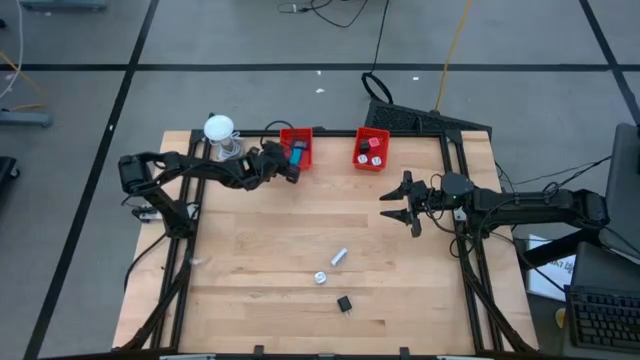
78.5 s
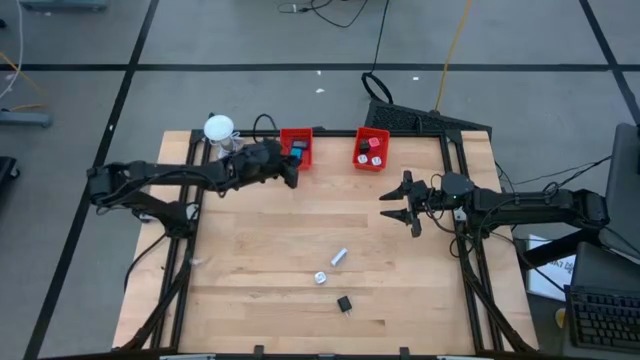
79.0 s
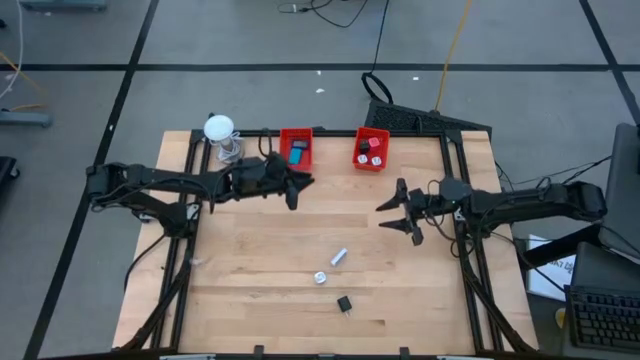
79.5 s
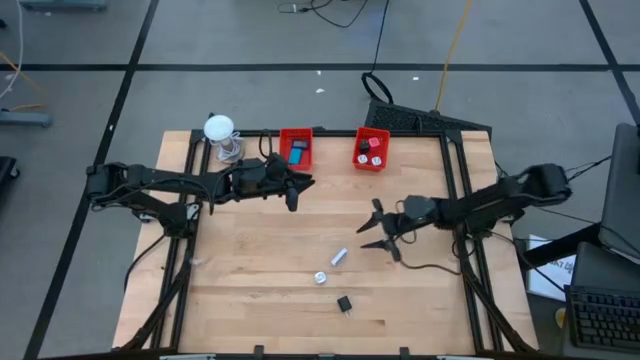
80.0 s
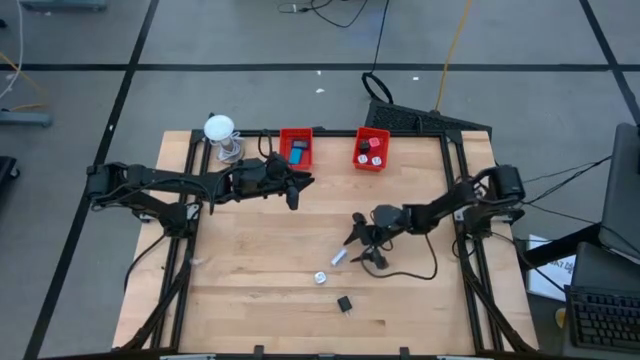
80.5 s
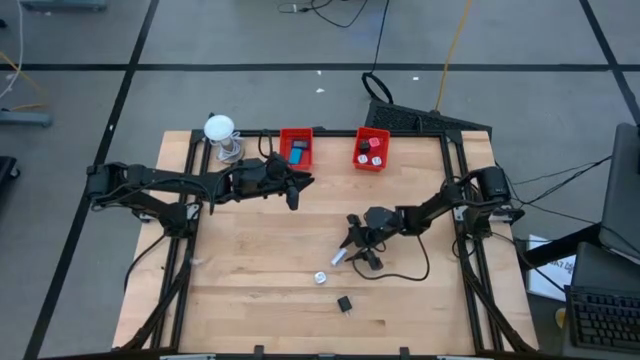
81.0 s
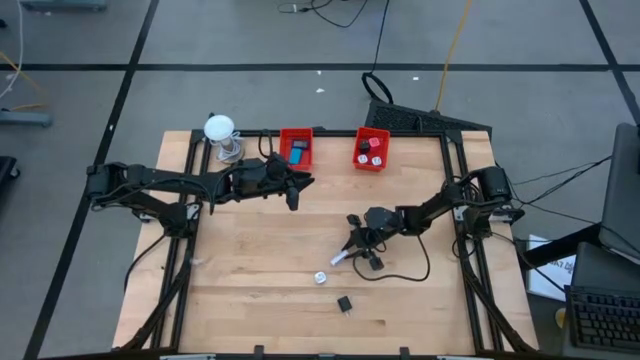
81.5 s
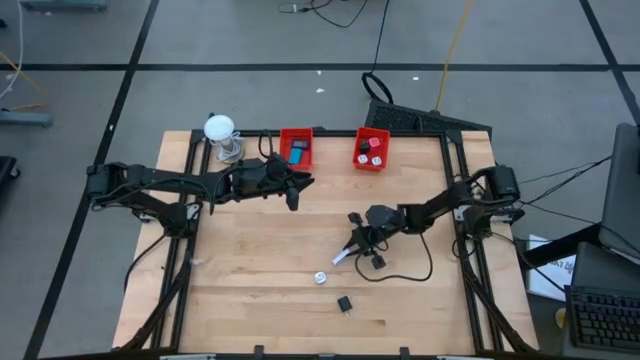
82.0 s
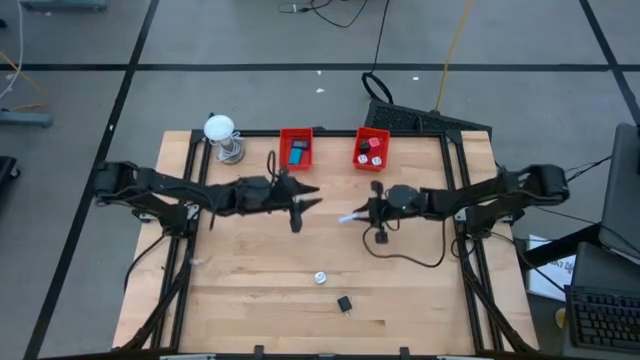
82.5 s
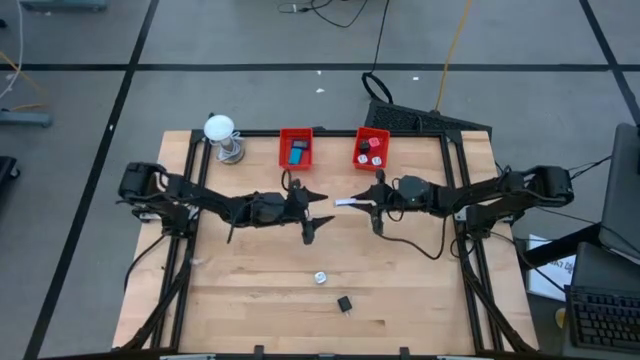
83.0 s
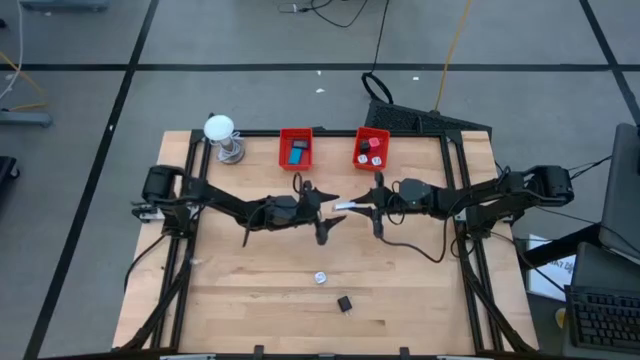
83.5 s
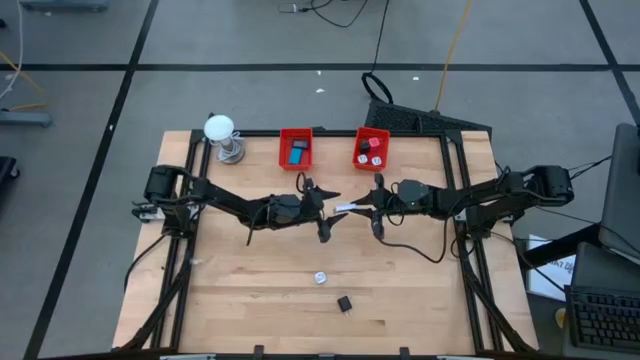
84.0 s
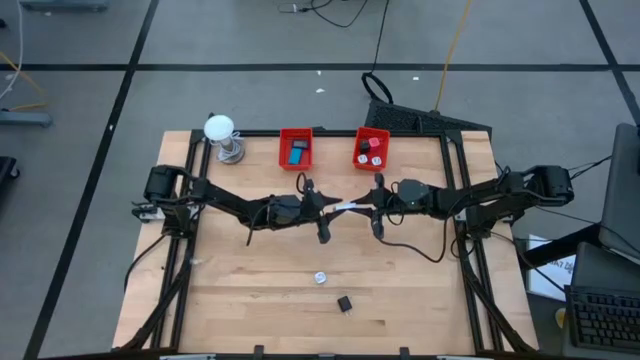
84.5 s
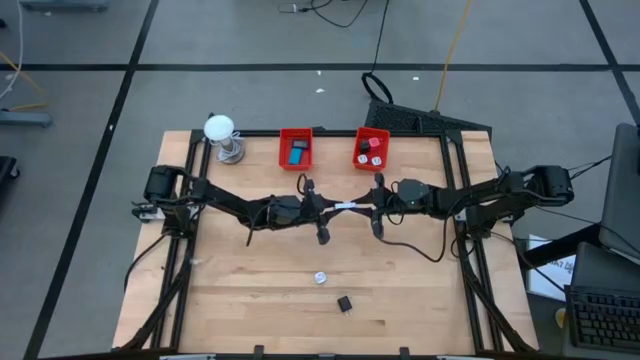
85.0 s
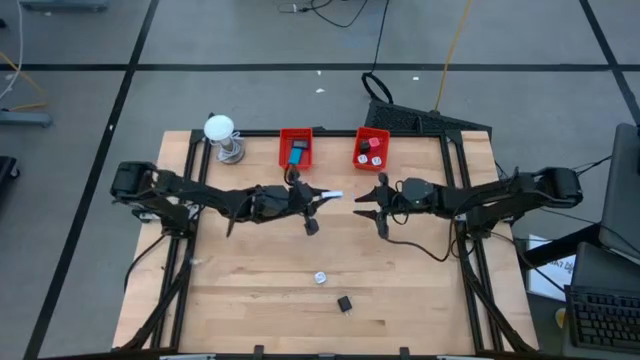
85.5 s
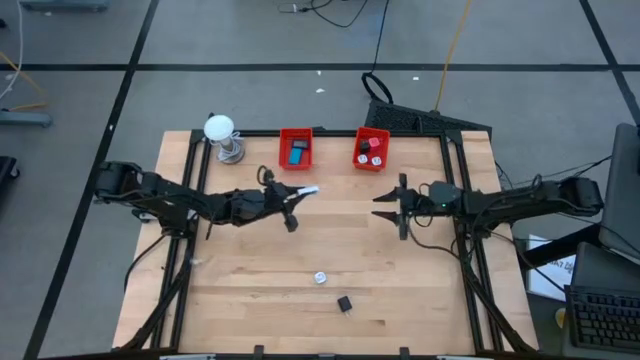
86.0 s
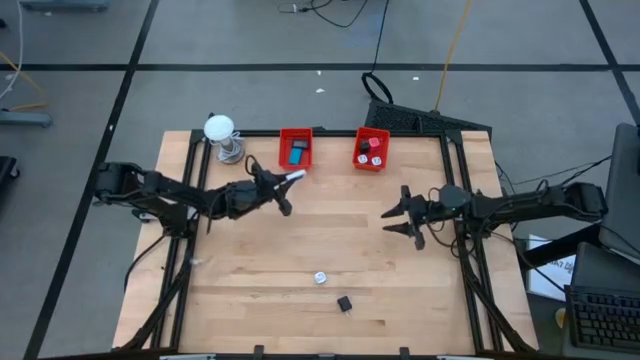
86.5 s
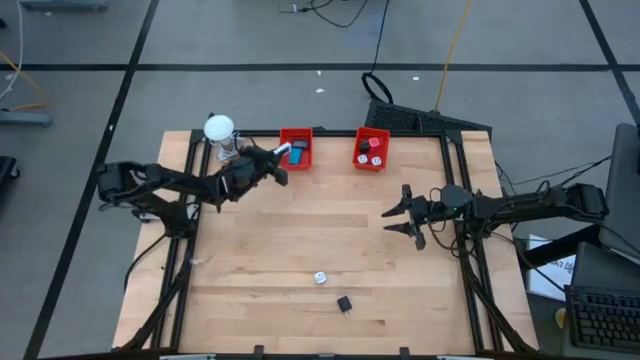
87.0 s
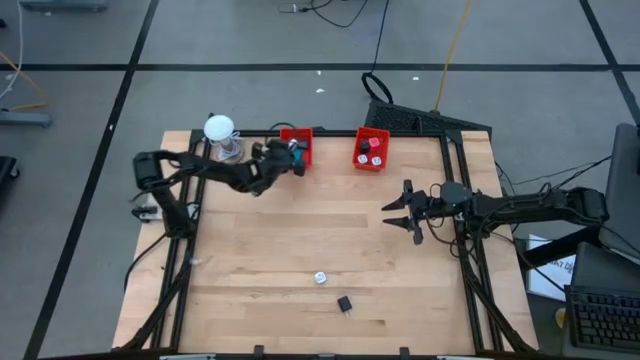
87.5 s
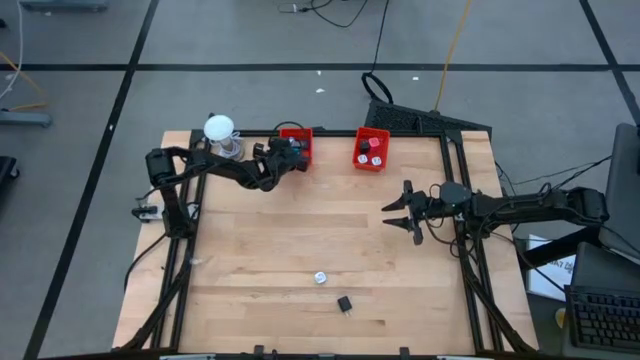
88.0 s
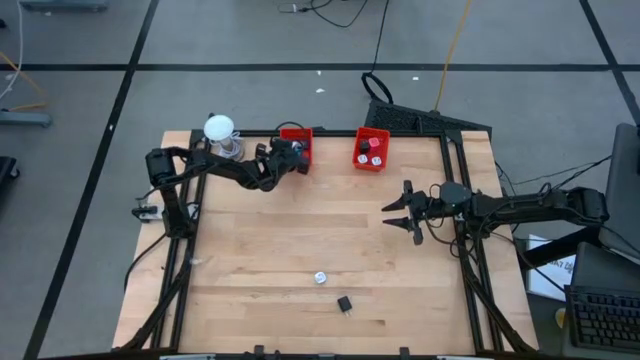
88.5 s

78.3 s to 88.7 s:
Task: Pick & Place Office items
Put the white digital timer into the left red basket

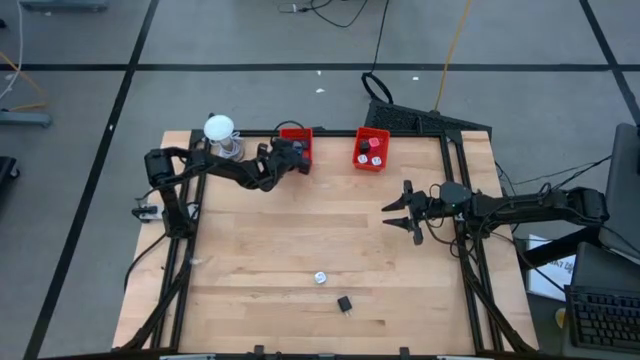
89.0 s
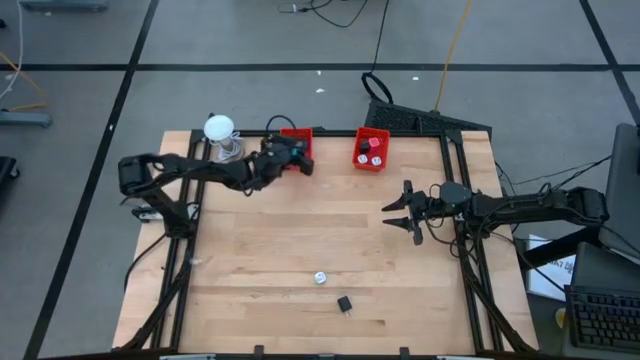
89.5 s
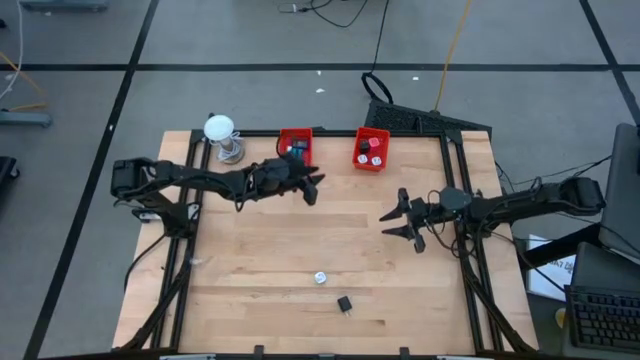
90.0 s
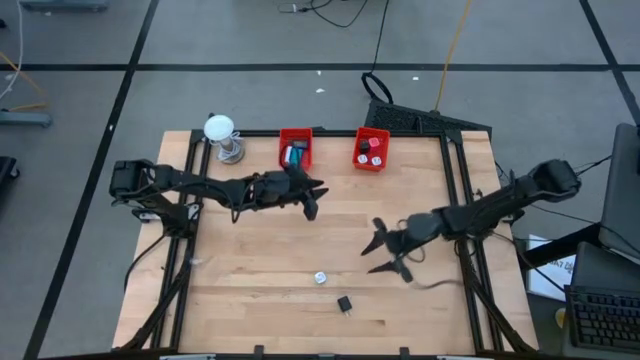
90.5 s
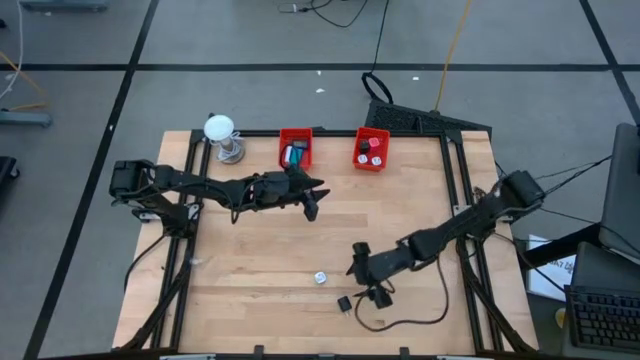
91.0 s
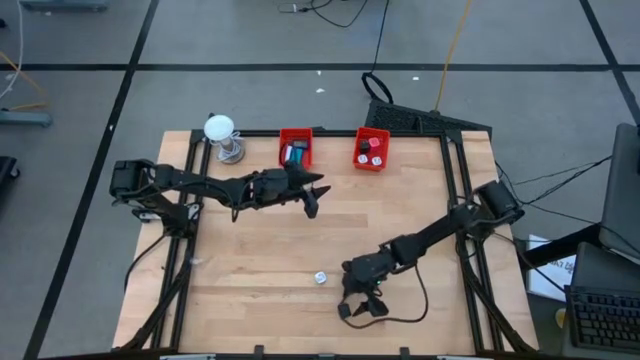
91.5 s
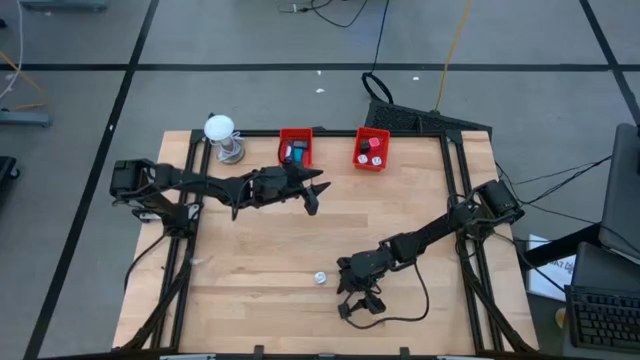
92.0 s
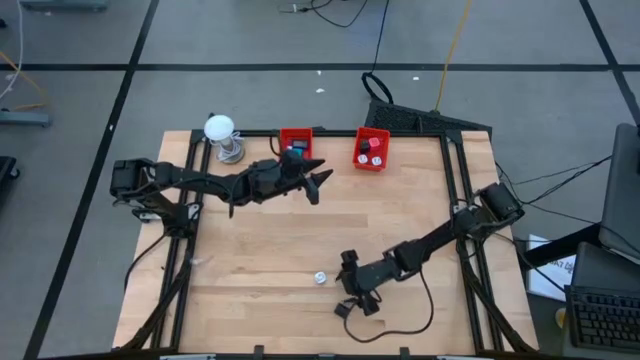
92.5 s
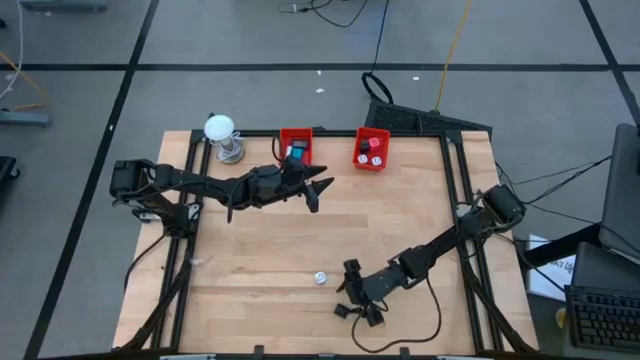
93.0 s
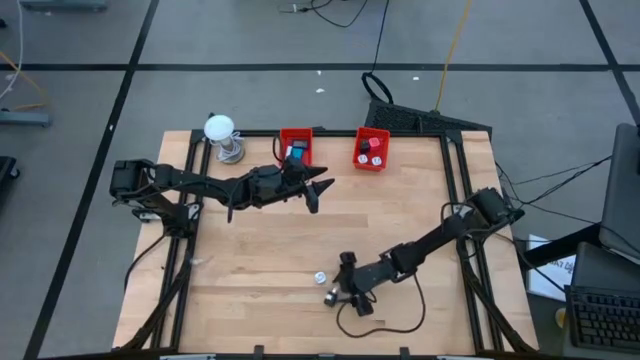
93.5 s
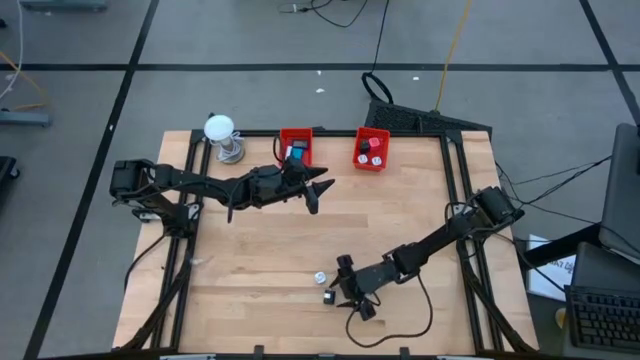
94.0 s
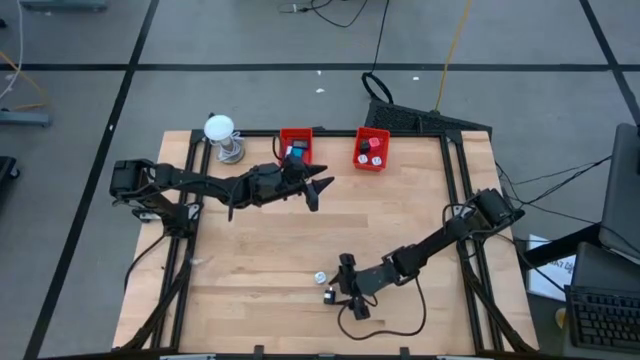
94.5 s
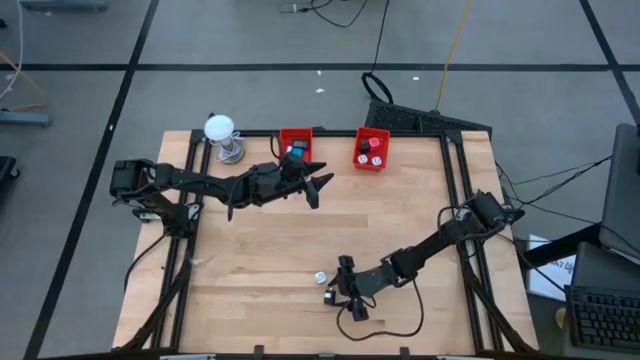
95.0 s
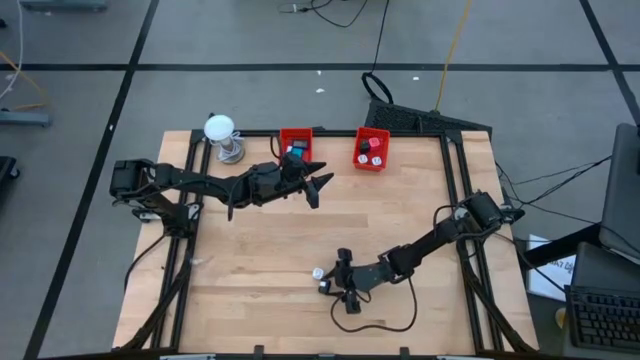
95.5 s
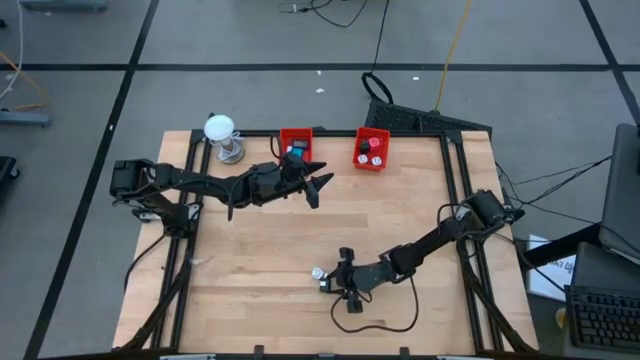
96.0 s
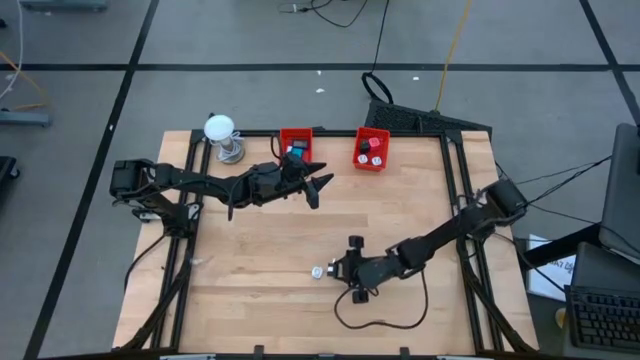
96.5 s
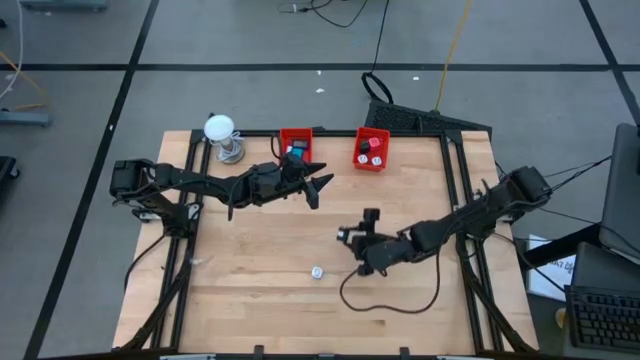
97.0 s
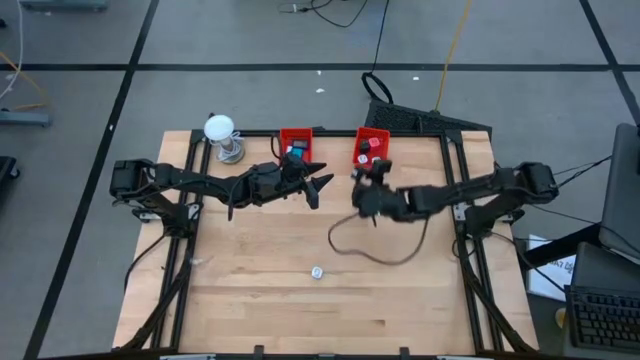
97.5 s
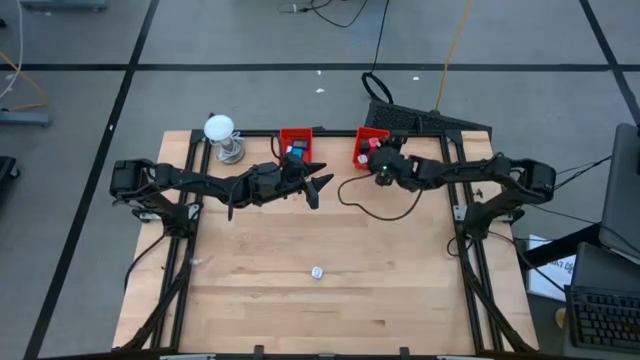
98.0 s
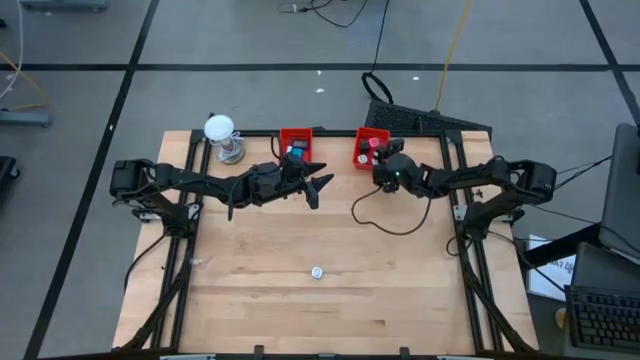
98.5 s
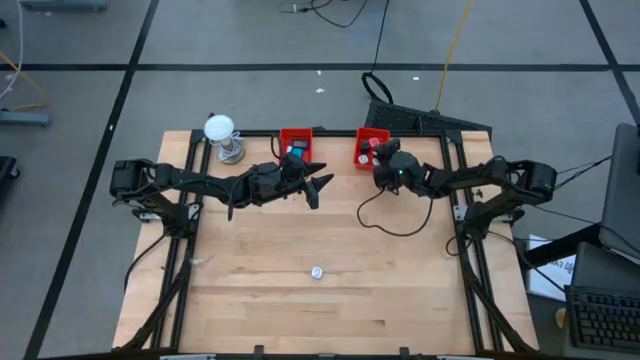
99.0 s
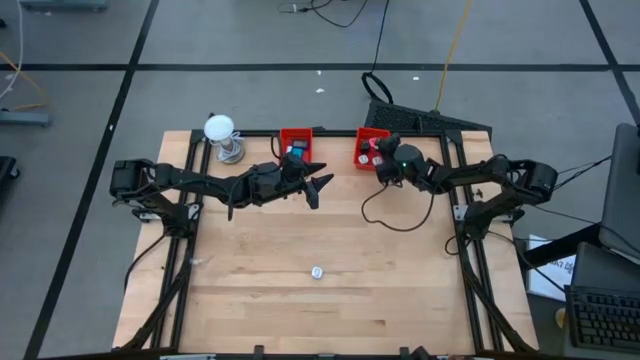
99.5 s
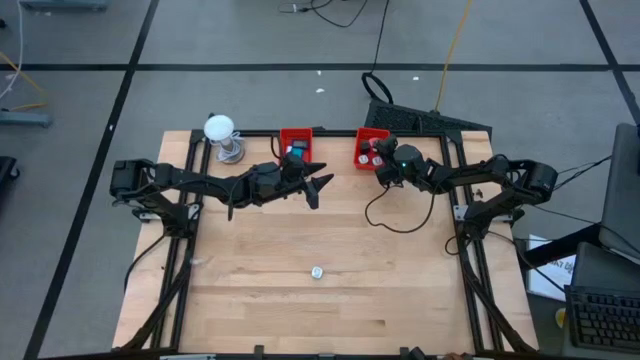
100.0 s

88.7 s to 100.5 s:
Put the black charger adapter into the right red basket
